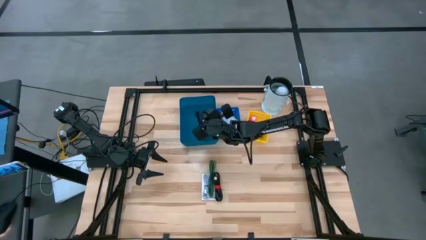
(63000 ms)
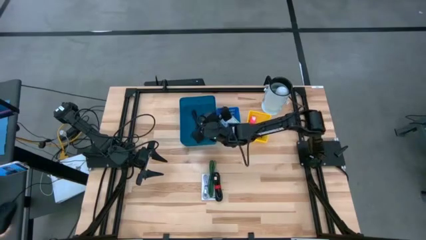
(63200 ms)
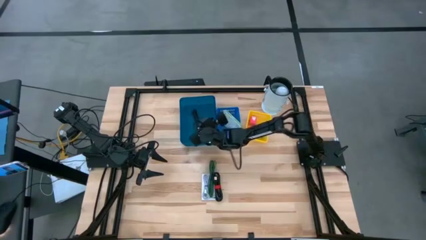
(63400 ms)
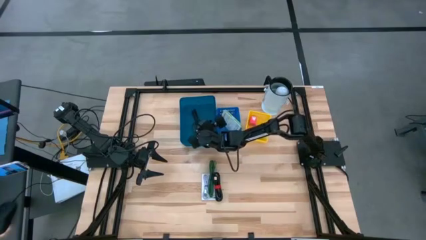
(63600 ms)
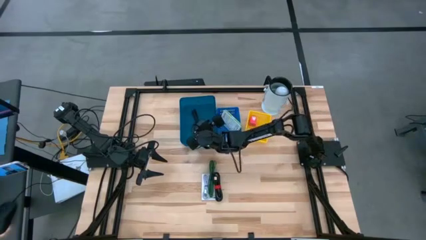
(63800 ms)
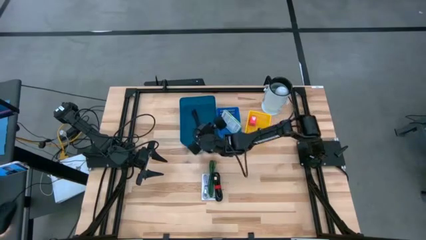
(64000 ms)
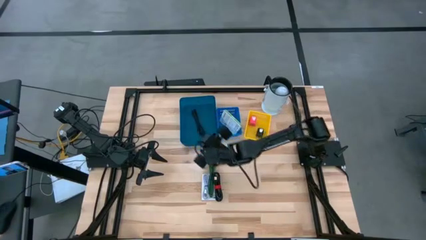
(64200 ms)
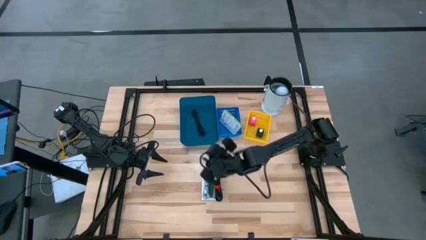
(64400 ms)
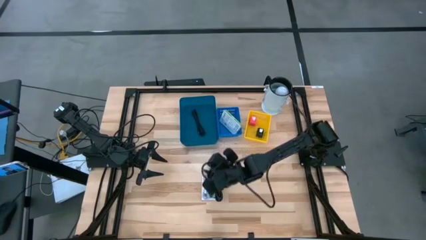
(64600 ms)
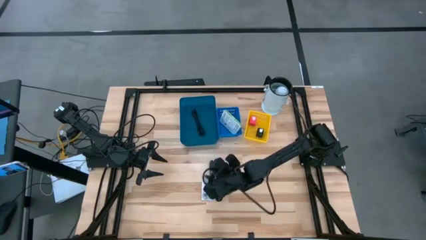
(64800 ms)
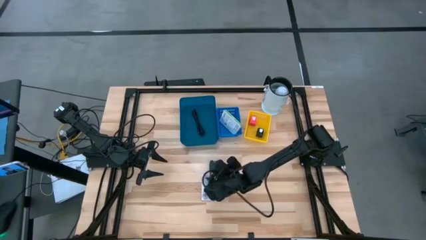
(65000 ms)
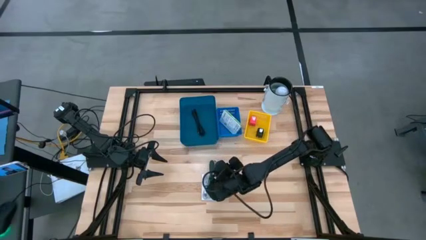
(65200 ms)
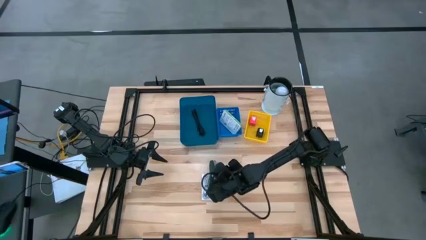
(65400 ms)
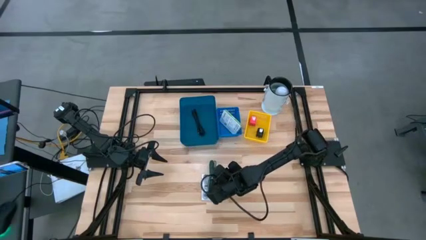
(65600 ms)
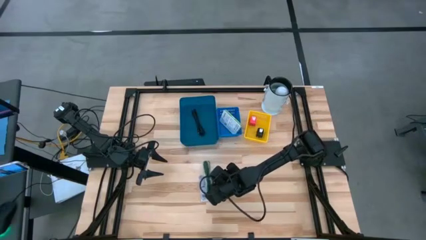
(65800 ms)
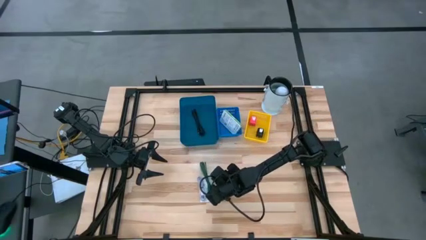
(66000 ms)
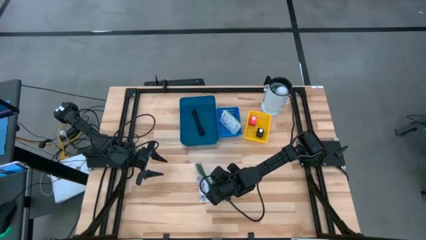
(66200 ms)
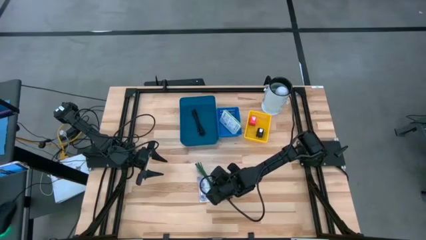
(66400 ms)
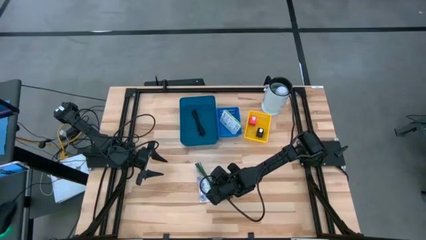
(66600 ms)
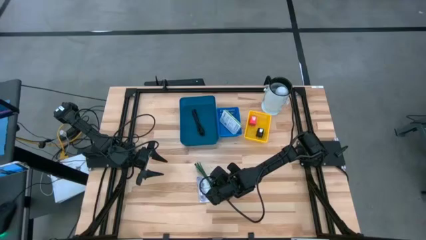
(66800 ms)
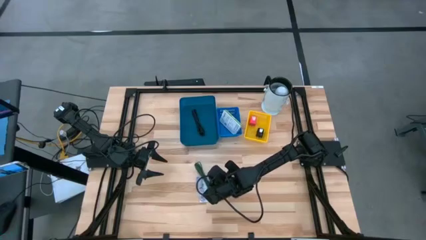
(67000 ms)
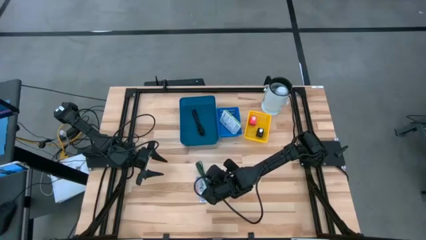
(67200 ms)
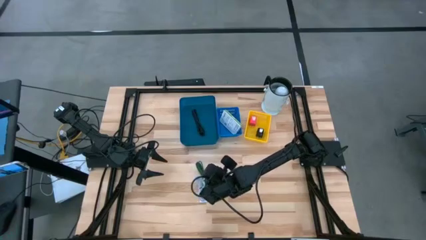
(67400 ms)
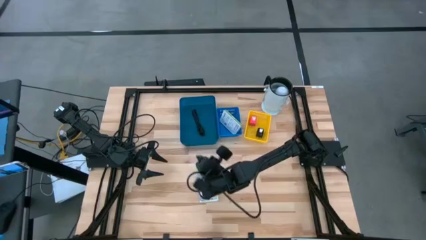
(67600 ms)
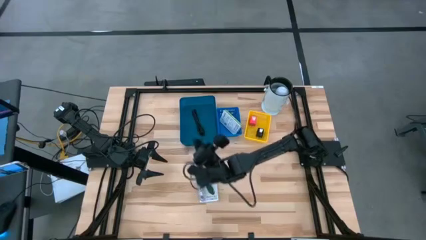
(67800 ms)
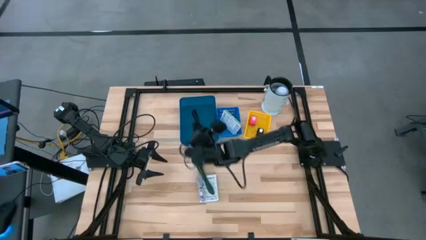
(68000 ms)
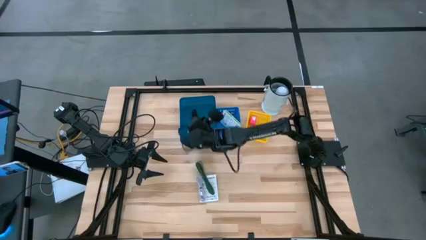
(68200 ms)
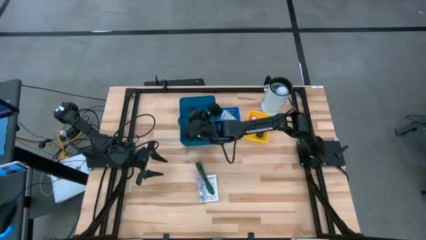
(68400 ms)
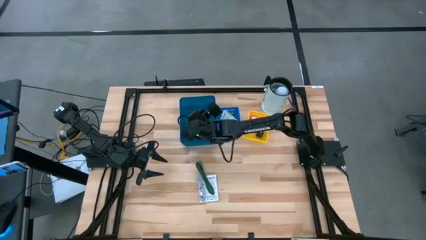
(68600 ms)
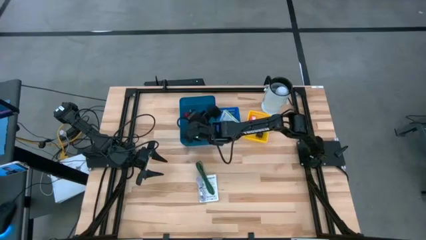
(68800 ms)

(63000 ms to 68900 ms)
Task: Pick and place items into bin
Put the black charger cable into the dark blue bin

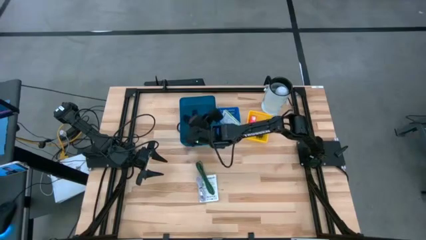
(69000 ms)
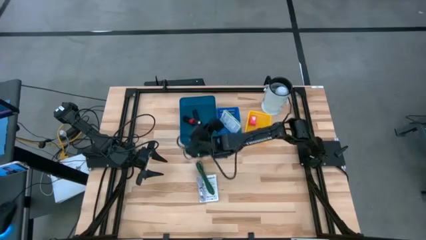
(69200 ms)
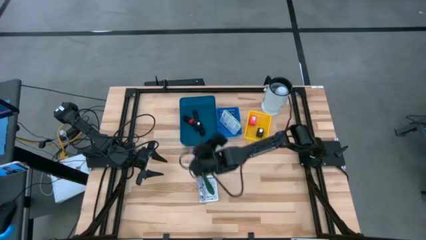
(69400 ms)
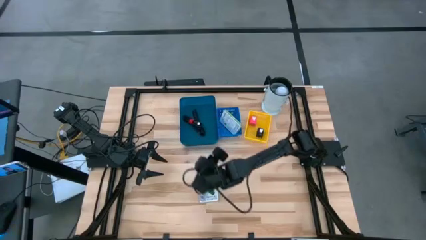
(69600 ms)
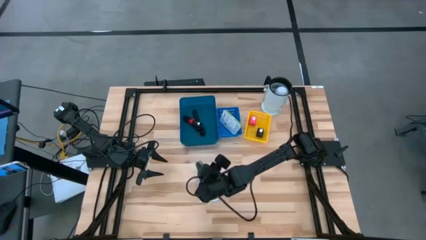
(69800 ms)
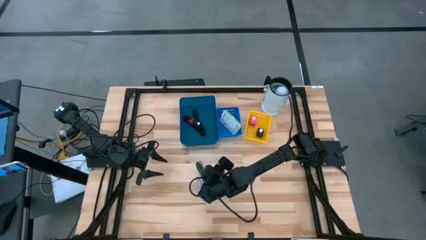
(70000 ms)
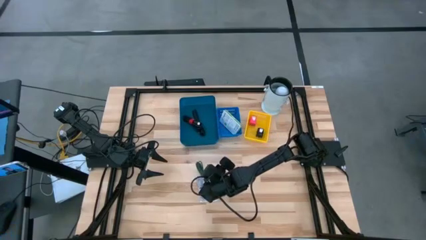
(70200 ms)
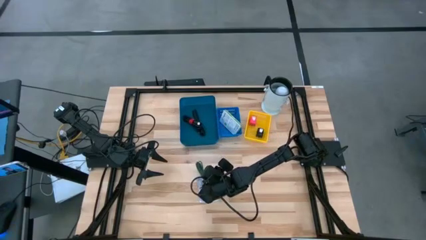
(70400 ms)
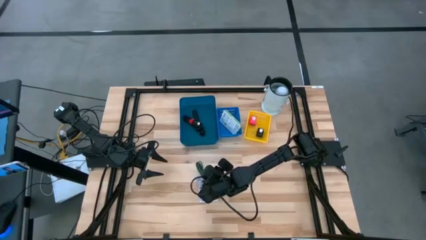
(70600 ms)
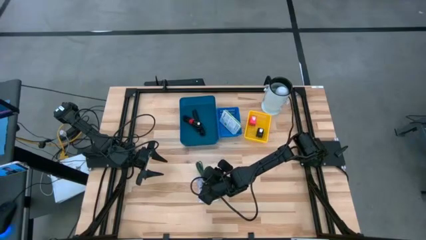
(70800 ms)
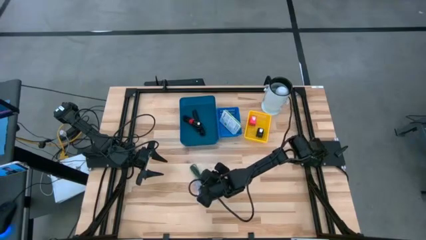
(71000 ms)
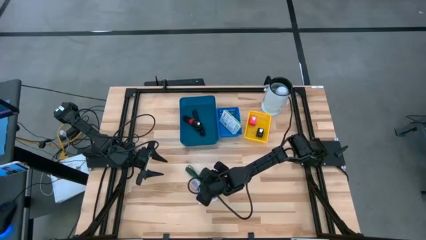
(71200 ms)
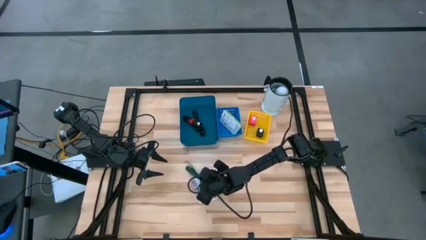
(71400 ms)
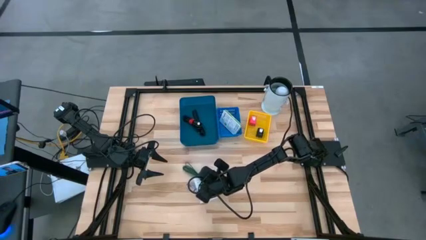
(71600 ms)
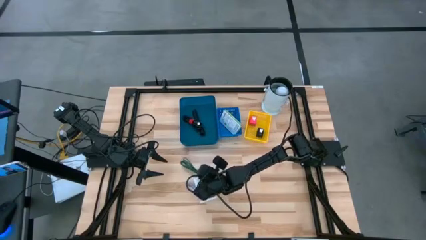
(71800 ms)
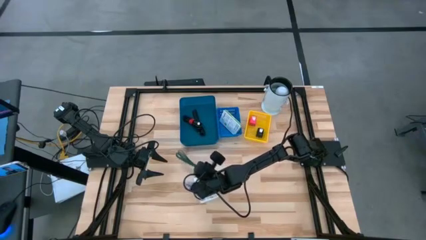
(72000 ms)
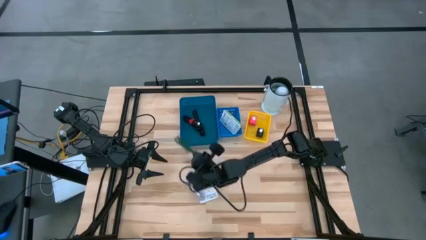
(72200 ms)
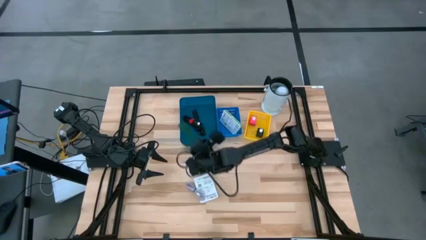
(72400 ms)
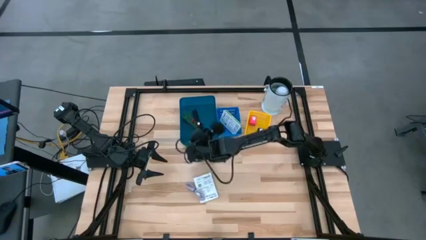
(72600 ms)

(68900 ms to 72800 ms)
Put the black charger cable into the dark blue bin

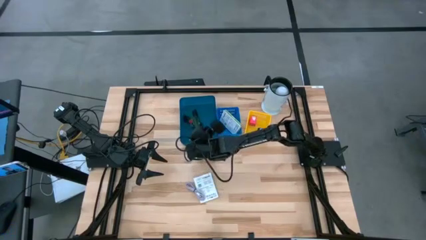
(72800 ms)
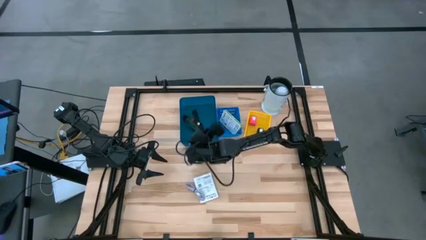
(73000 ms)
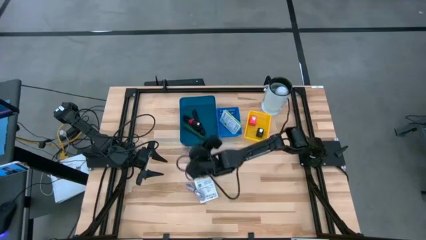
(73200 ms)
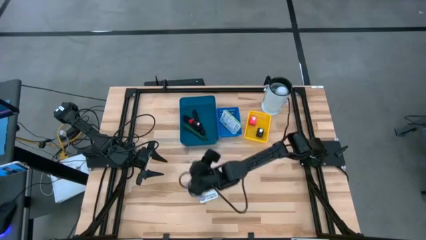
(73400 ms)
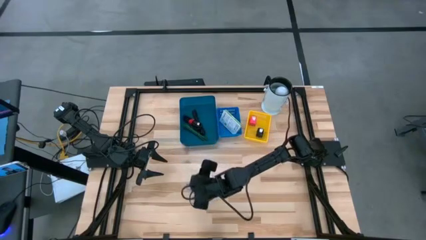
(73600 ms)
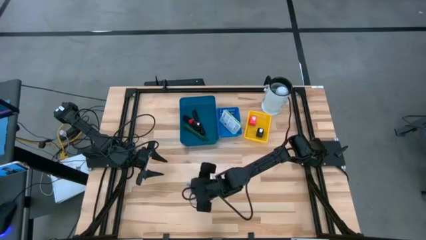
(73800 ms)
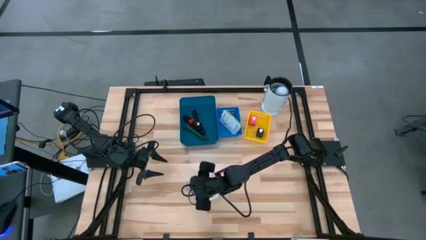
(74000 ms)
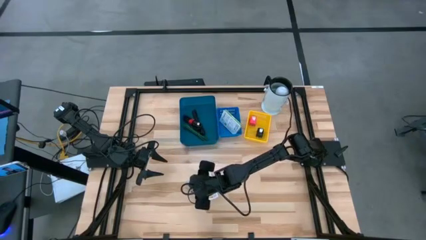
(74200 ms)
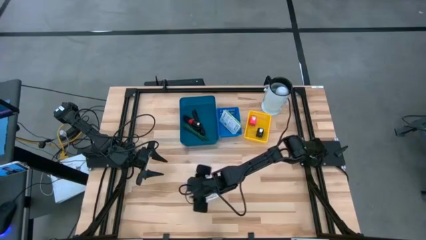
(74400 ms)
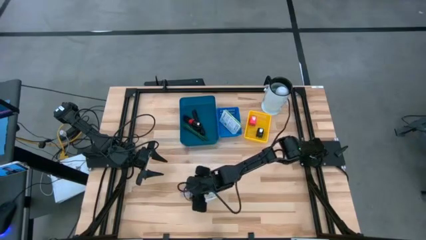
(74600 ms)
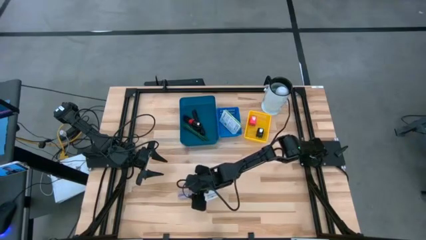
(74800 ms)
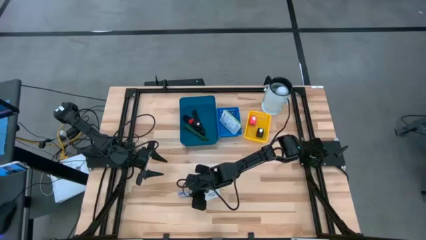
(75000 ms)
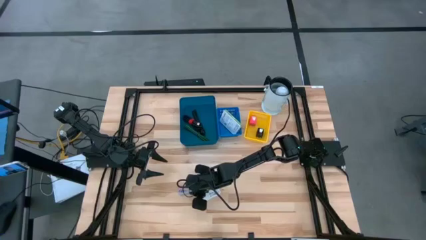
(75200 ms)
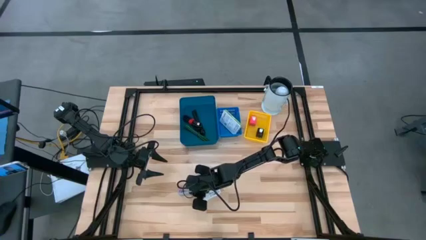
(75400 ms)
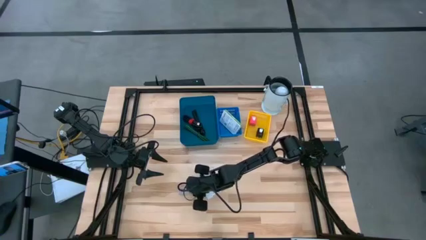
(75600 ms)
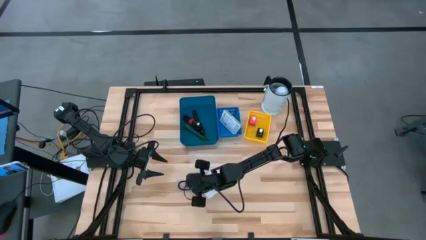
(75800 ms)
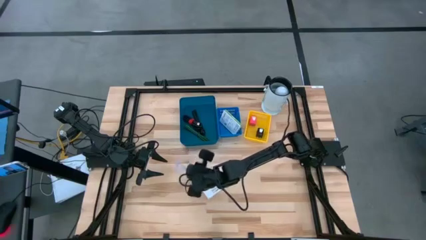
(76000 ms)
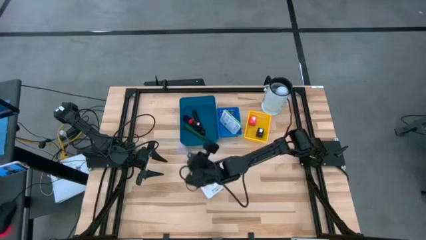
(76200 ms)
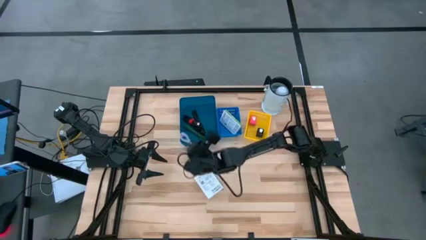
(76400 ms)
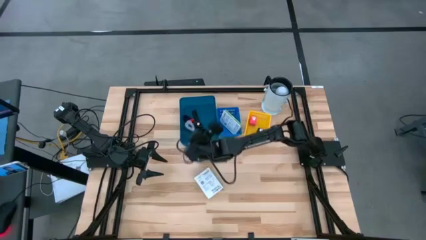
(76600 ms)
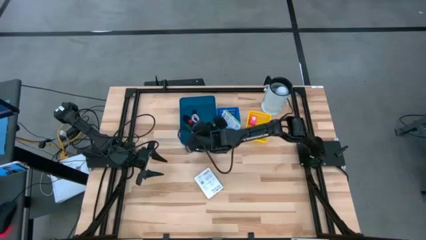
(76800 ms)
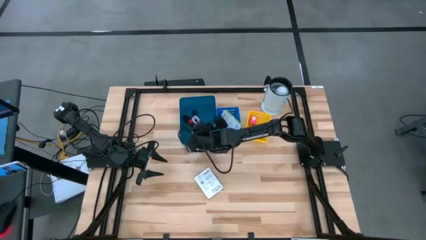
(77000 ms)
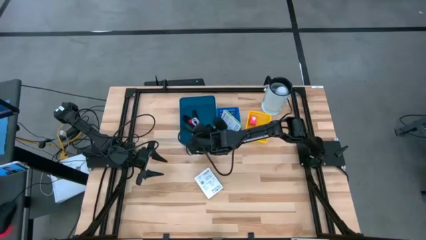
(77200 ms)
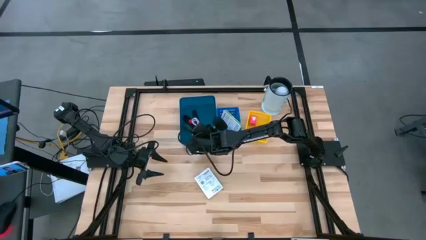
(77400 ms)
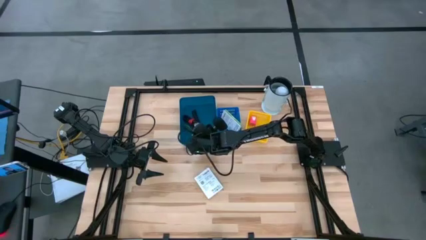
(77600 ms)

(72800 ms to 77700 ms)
Put the white charger cable into the dark blue bin

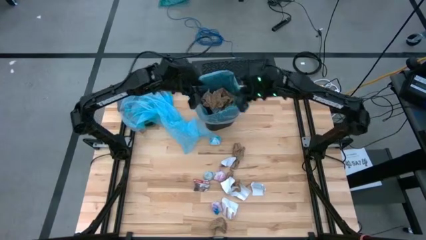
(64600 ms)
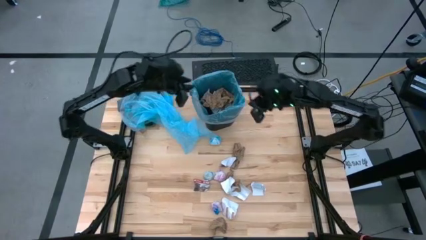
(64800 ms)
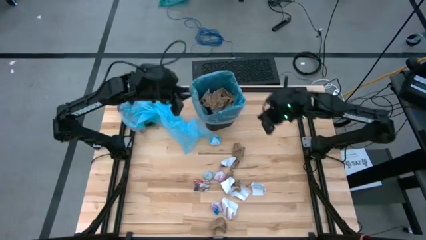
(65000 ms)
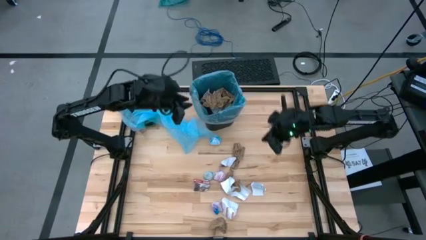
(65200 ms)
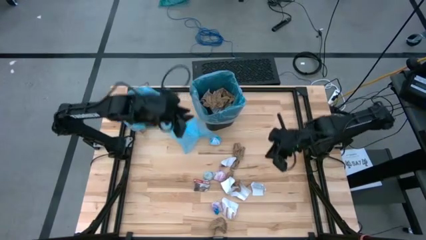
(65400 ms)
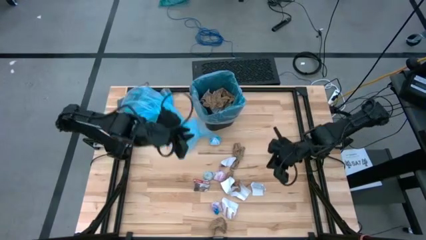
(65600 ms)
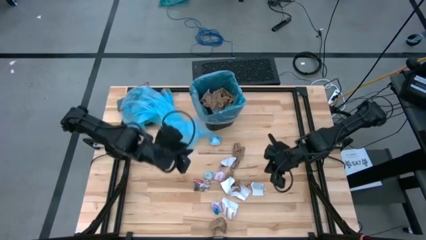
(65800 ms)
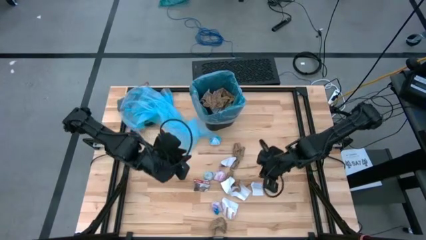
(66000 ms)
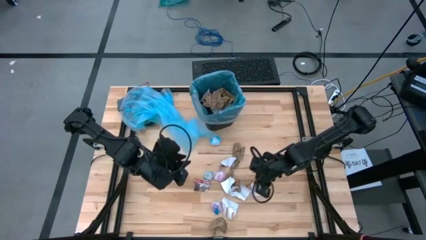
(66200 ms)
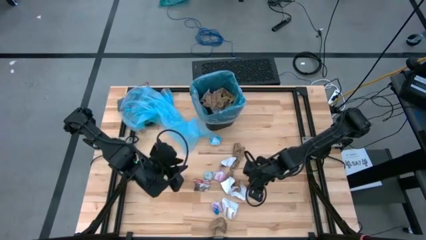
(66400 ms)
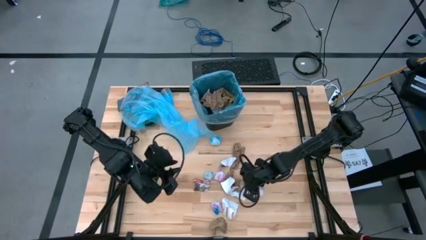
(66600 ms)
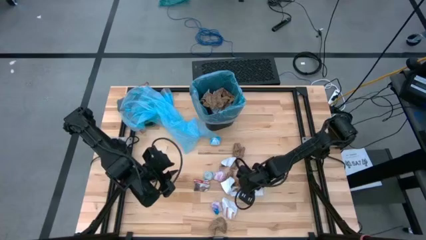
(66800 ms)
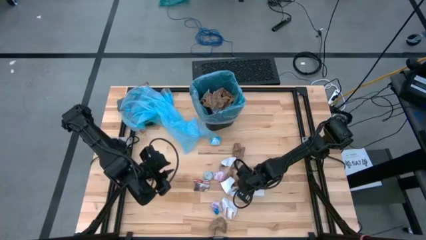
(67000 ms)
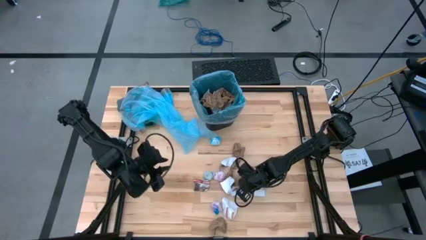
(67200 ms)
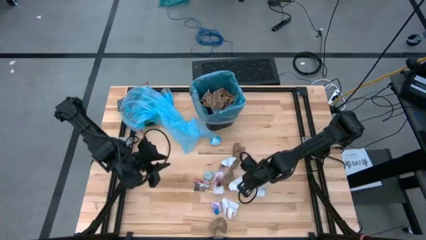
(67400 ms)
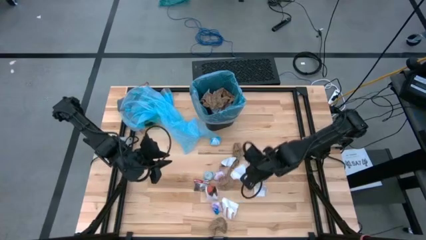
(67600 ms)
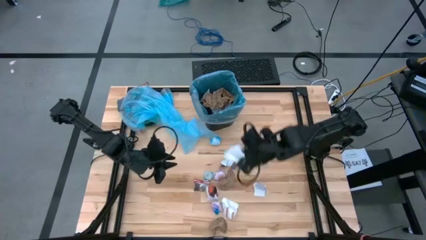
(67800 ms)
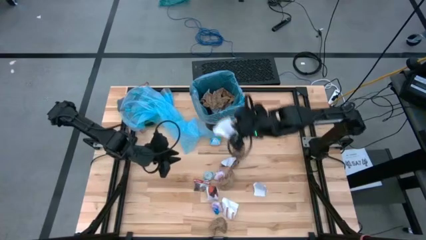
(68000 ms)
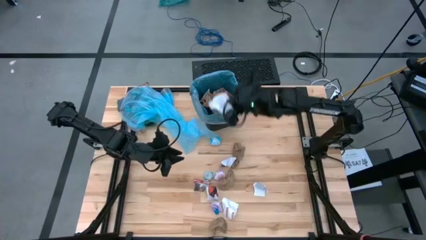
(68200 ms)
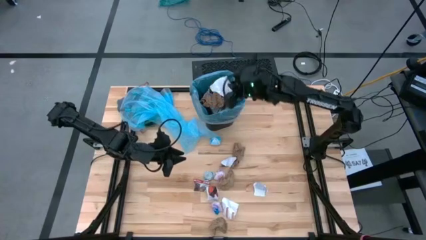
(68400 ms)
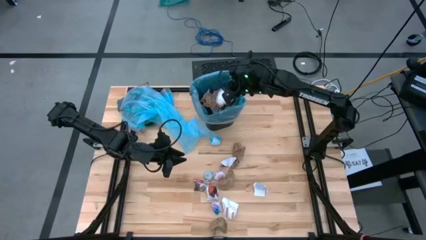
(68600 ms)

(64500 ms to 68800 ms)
Task: place trash/remove bag and relplace
Put the white paper into the trash bin
